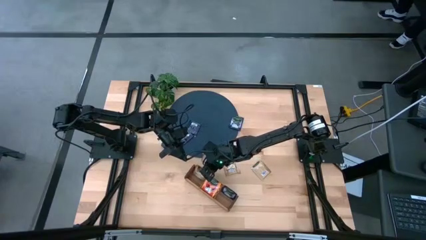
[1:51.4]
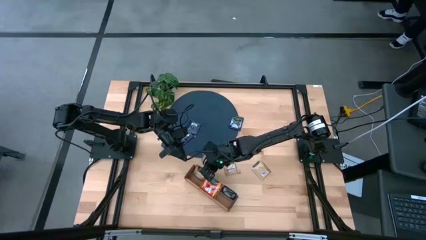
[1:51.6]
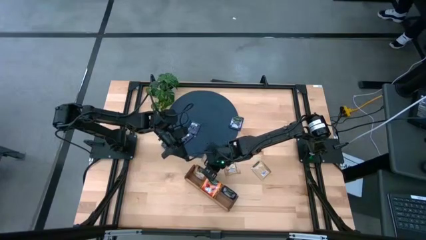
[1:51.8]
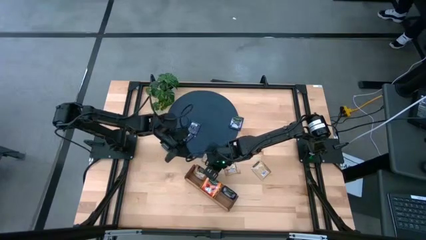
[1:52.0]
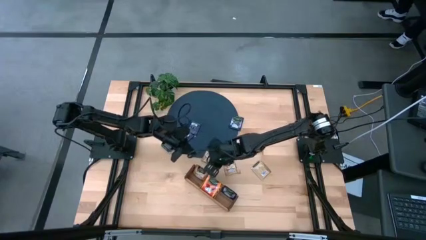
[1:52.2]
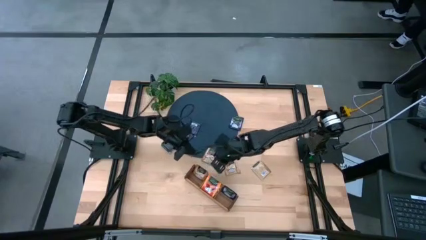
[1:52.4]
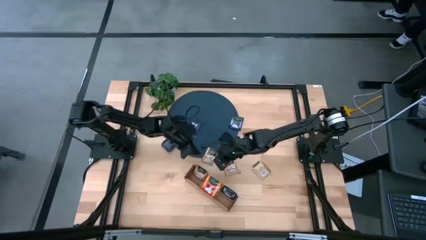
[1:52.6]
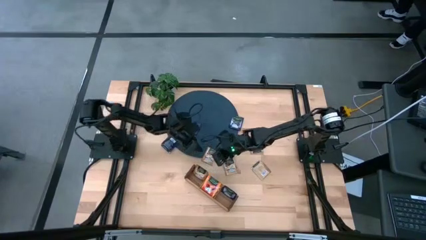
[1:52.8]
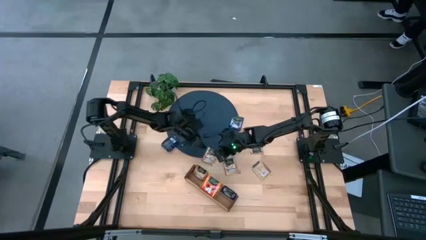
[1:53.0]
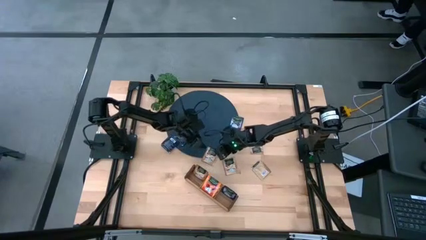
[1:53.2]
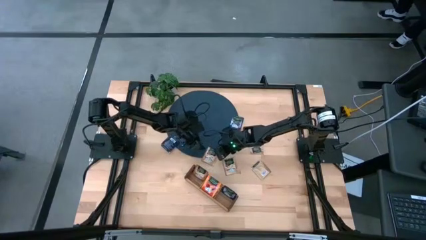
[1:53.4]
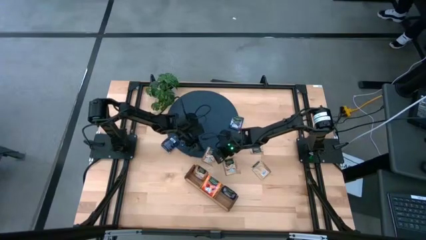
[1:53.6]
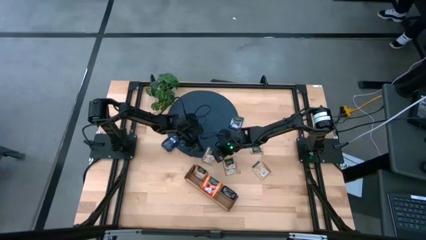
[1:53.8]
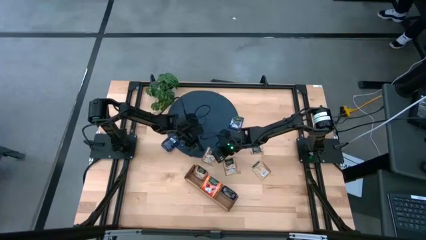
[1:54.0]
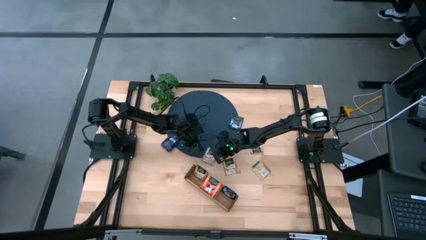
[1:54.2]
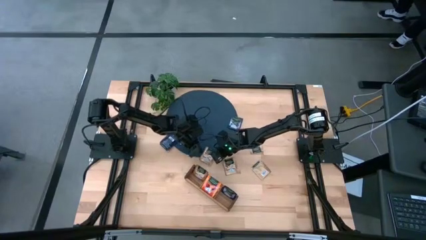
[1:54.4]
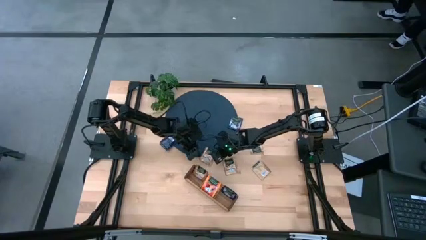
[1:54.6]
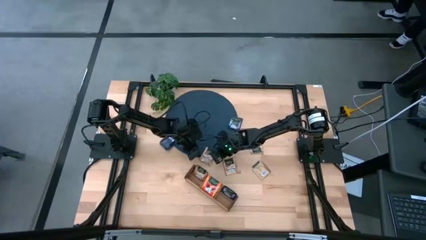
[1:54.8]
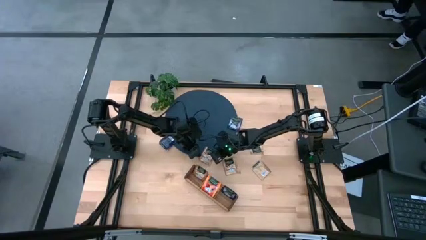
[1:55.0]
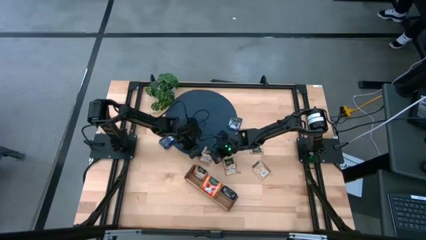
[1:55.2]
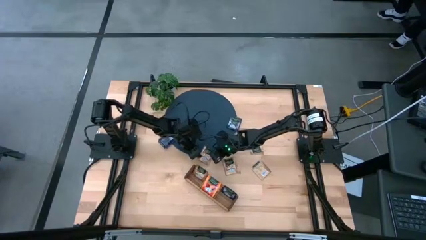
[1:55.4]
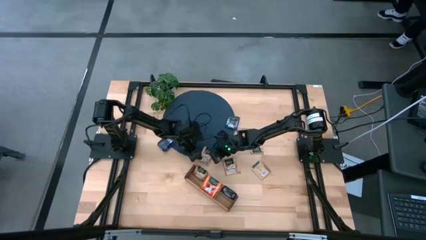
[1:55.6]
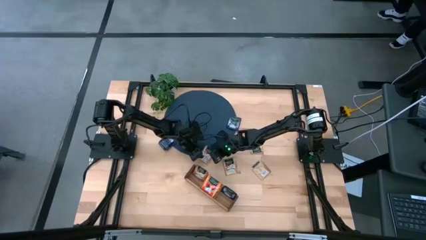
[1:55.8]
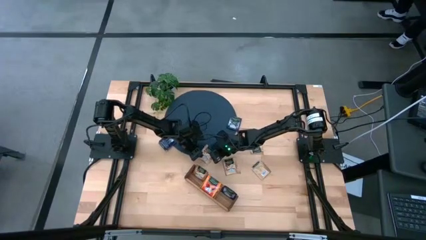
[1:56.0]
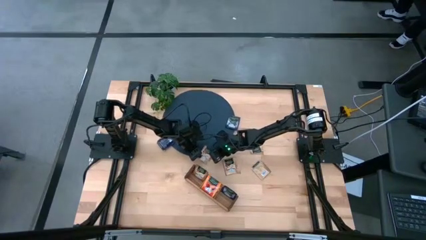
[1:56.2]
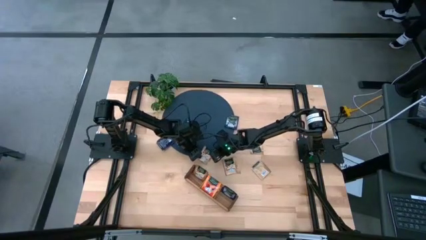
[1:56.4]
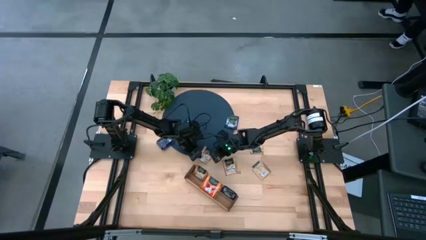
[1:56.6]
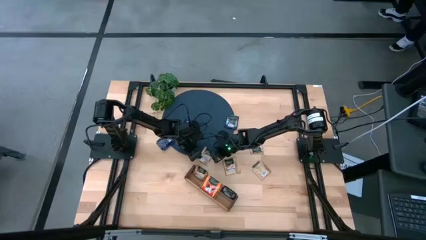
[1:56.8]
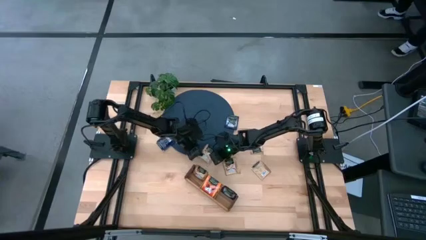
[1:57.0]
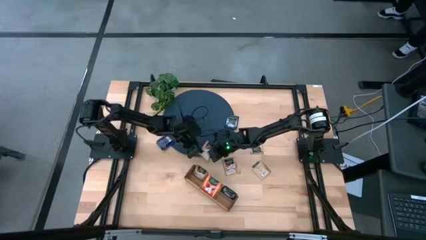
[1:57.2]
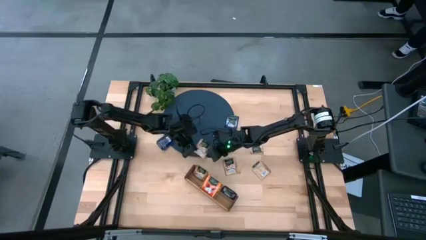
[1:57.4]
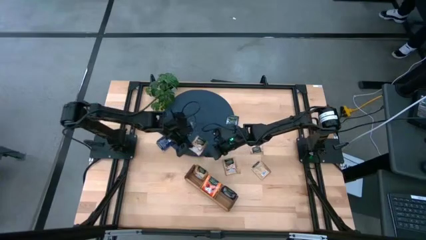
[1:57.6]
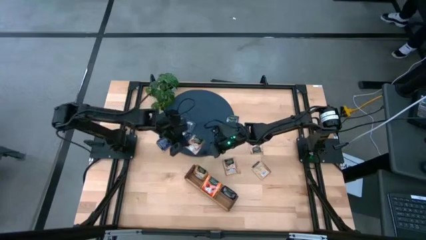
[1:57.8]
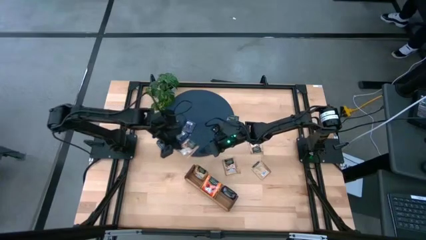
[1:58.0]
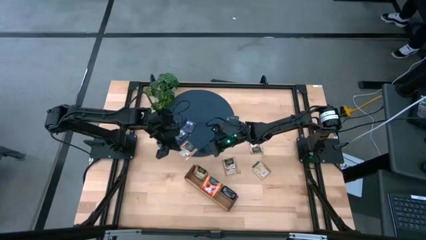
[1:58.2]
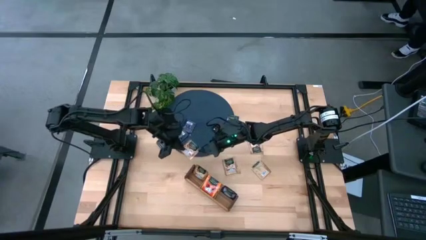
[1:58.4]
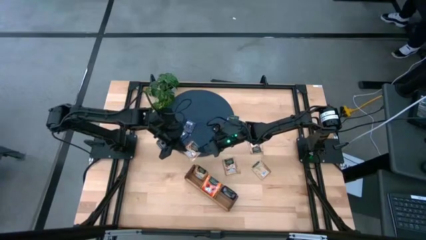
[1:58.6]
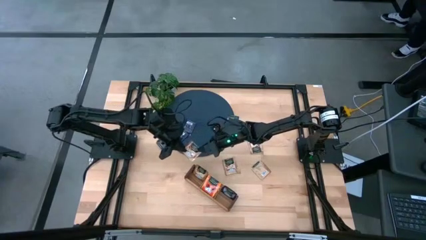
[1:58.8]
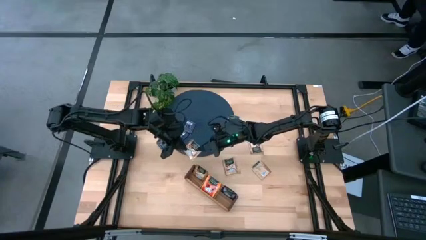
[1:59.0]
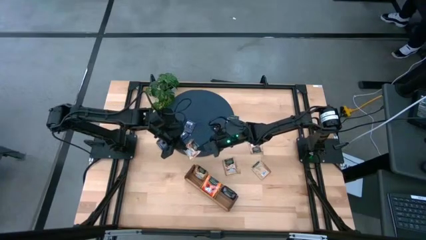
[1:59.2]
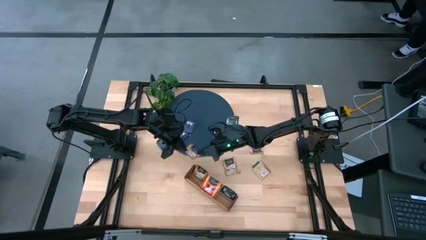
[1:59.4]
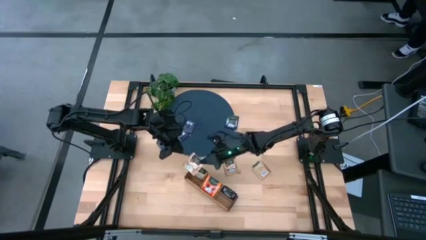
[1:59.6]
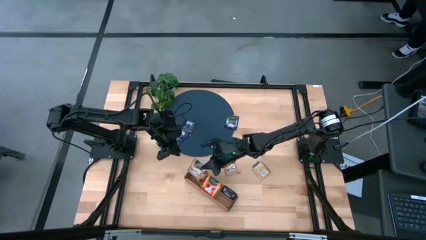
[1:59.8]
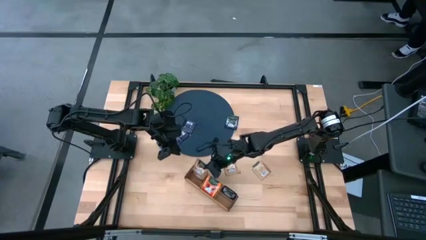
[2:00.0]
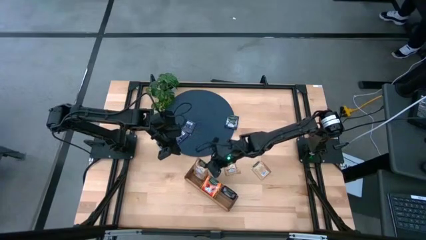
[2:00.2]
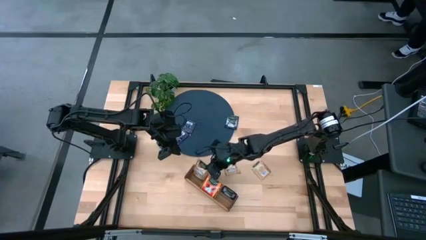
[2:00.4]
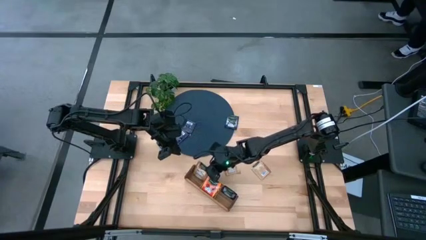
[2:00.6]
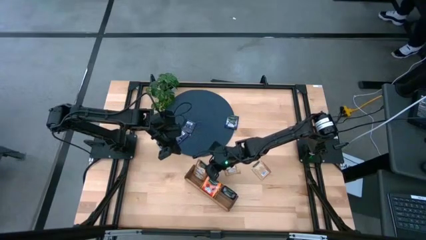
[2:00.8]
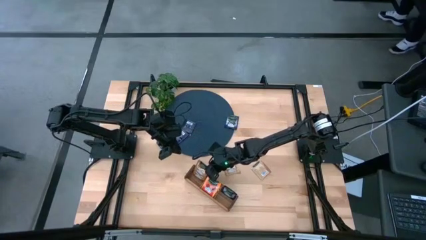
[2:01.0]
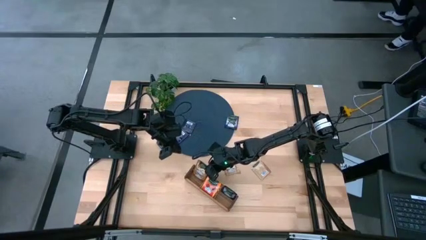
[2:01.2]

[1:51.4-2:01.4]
Task: Pick & Place Tea
Put the brown tea bag into the left section of the wooden organizer

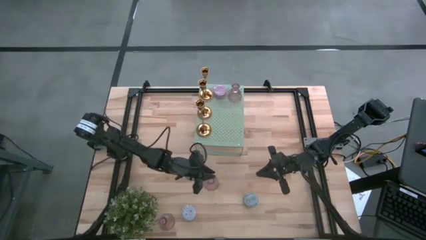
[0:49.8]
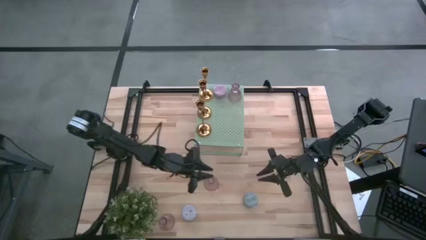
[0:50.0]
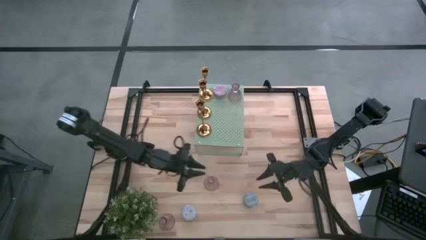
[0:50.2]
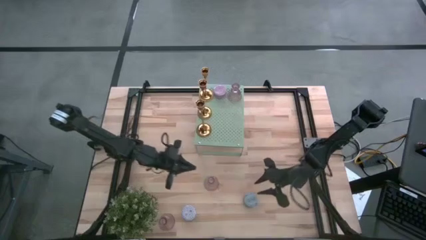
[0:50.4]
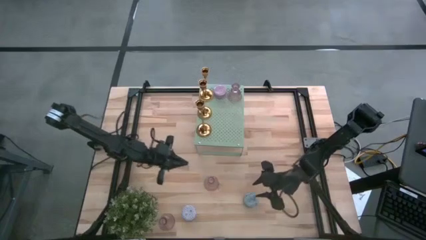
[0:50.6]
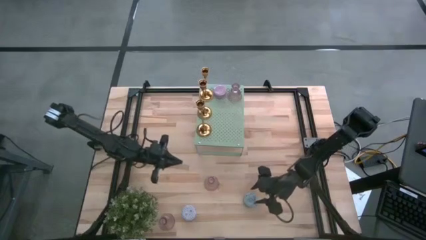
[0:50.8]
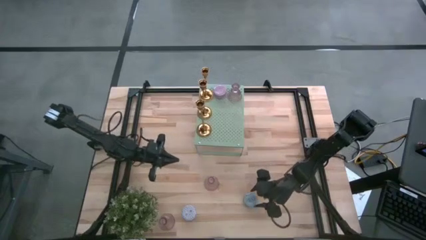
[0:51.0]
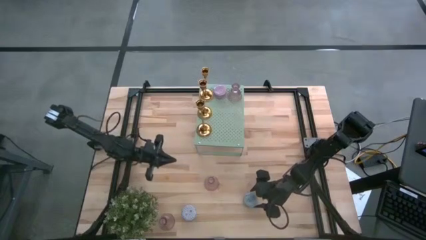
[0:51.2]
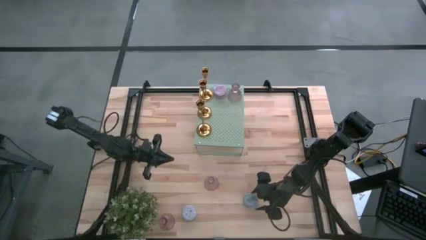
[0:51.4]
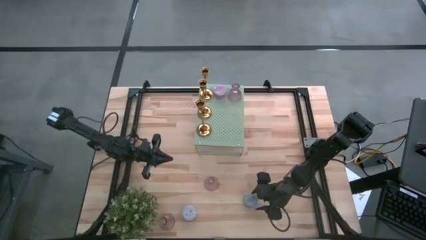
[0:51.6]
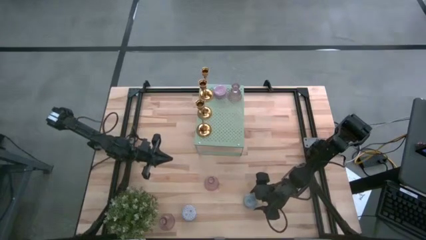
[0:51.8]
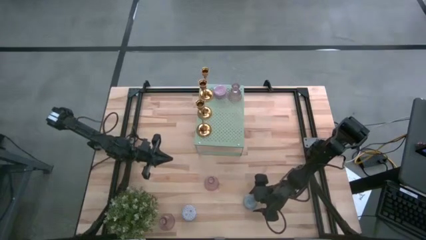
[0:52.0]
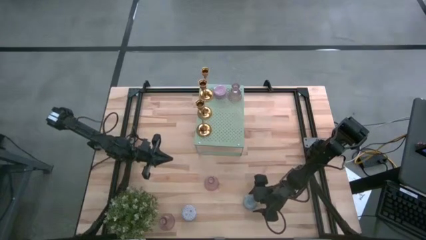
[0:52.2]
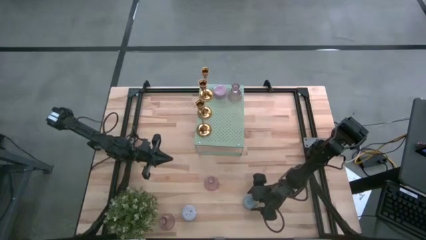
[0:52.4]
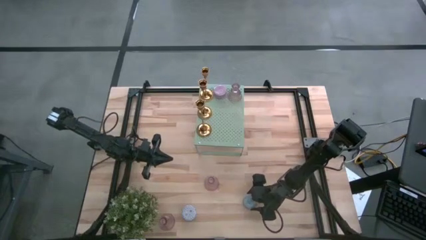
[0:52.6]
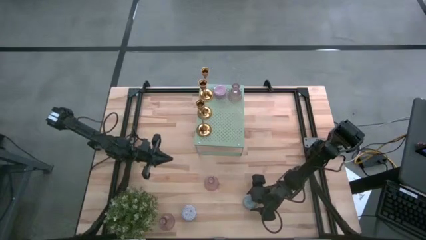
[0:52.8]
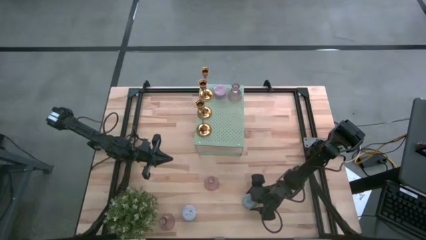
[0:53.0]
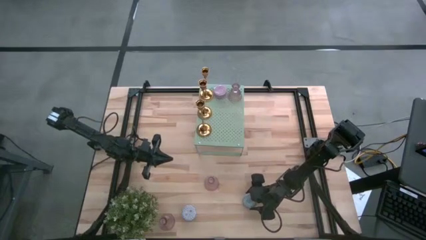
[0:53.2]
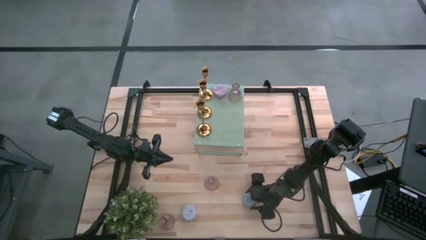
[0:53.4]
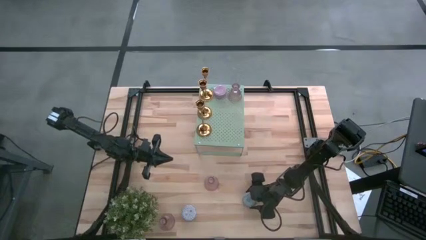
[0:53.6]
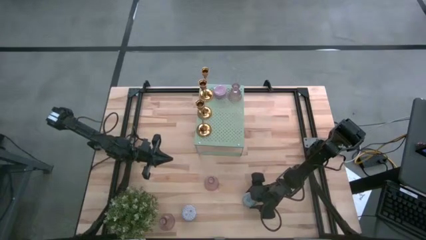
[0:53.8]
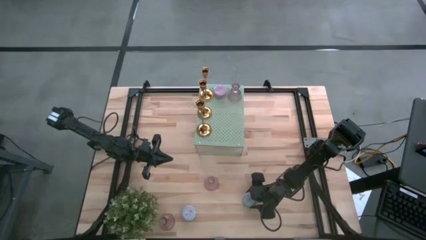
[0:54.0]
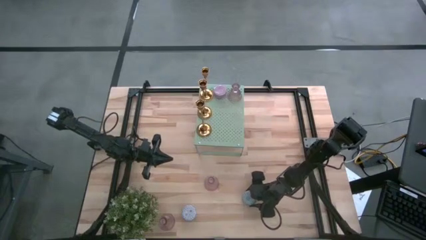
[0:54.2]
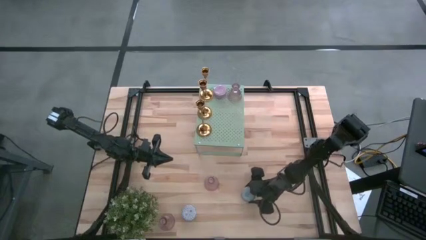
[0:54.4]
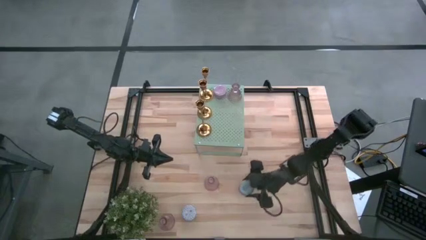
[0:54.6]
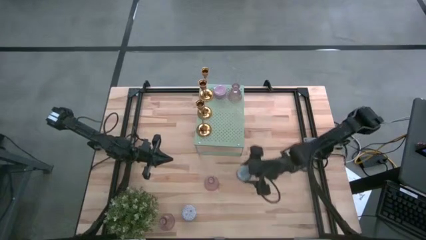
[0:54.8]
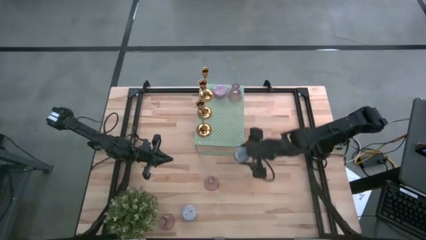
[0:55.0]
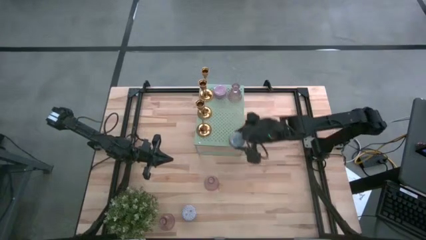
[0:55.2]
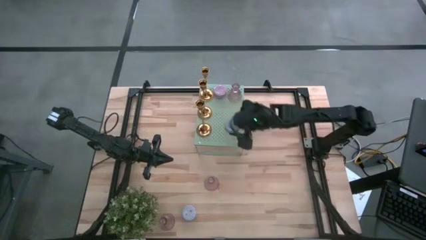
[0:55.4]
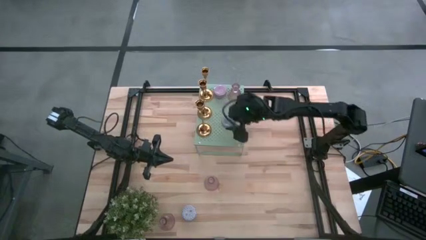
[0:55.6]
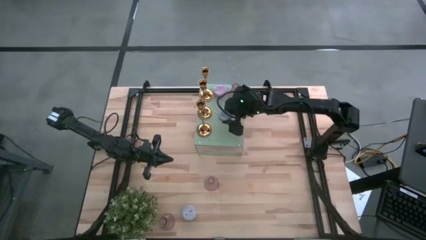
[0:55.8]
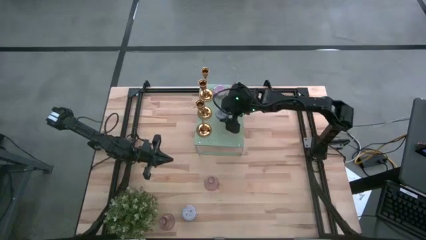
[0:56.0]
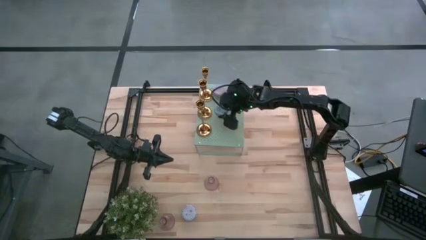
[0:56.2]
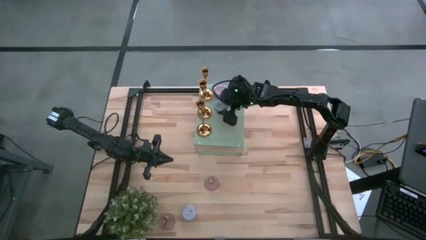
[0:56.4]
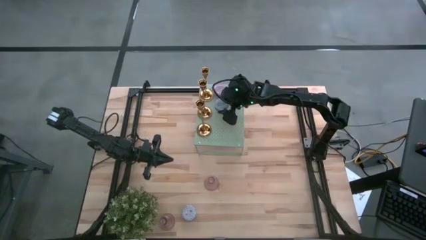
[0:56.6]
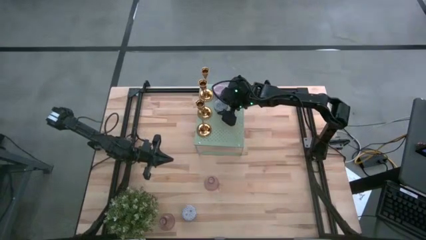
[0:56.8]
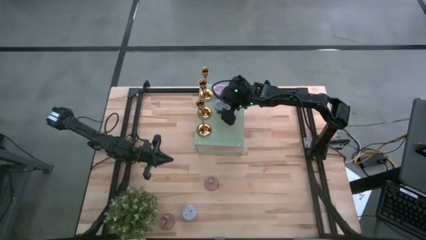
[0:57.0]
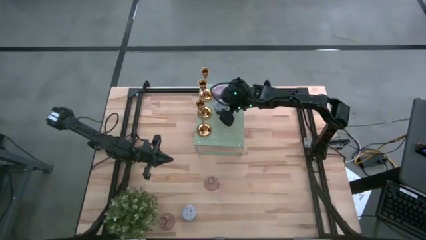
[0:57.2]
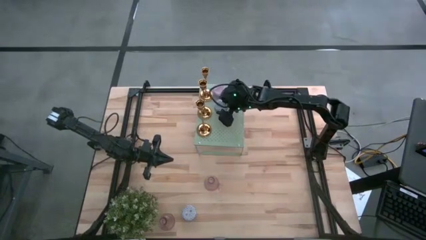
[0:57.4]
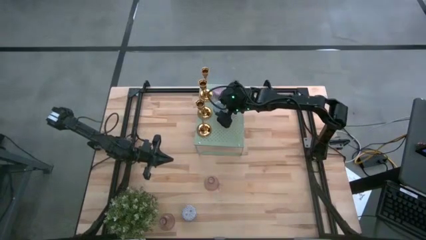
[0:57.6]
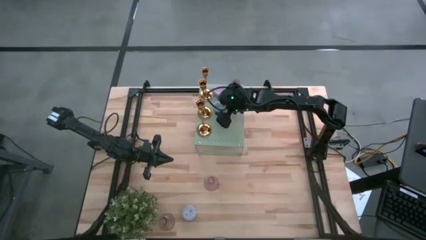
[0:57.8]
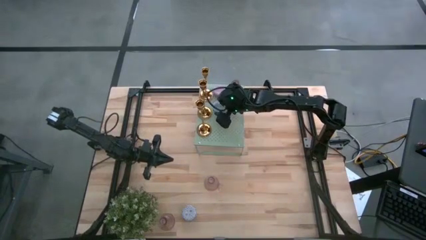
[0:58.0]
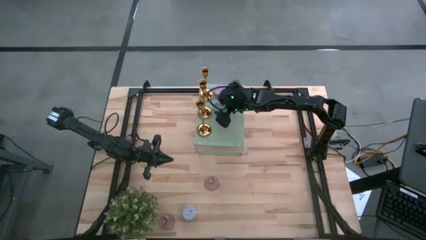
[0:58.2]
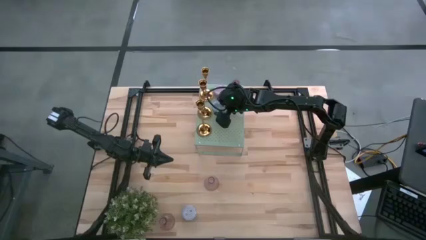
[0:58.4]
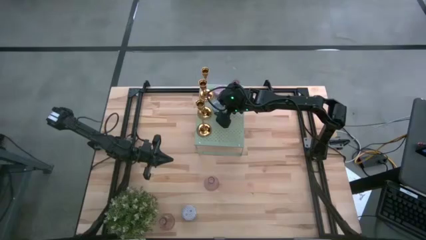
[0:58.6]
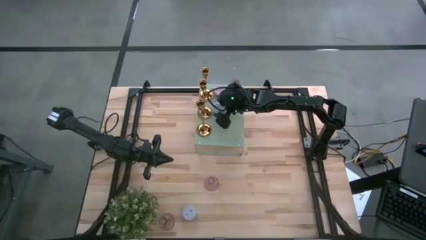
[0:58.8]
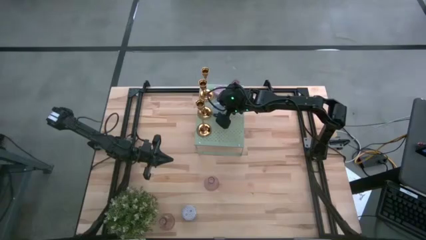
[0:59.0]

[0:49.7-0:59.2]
Task: Pick & Place candle stick holders
Put the patterned light blue green scented candle on the shelf
